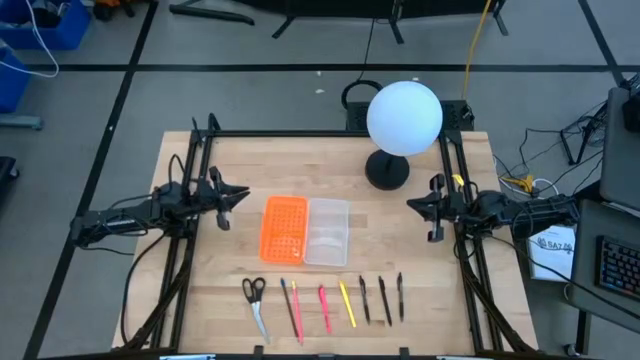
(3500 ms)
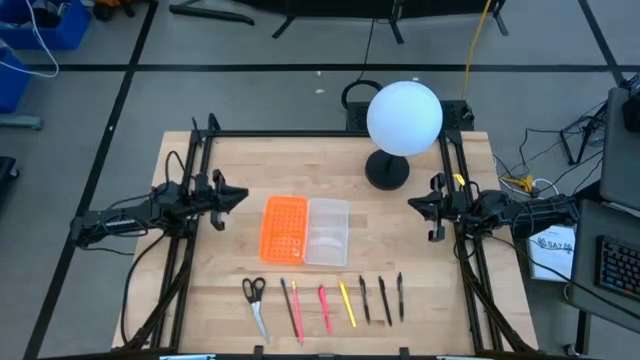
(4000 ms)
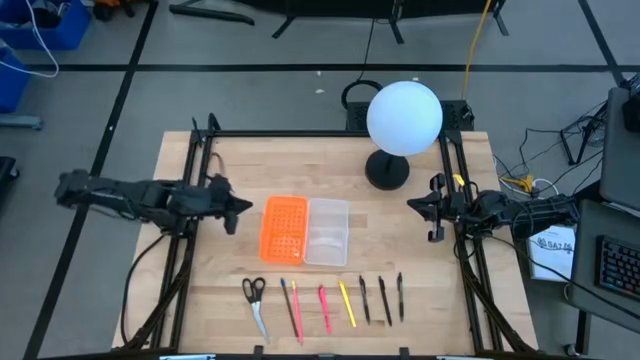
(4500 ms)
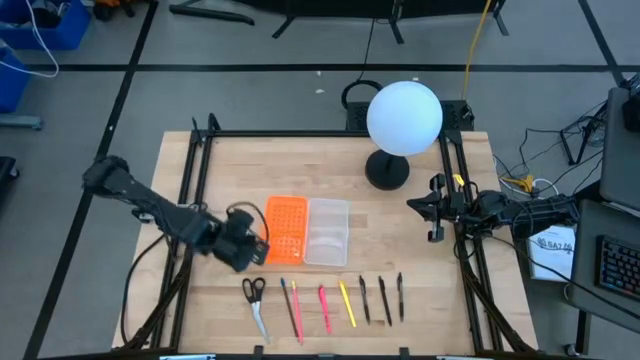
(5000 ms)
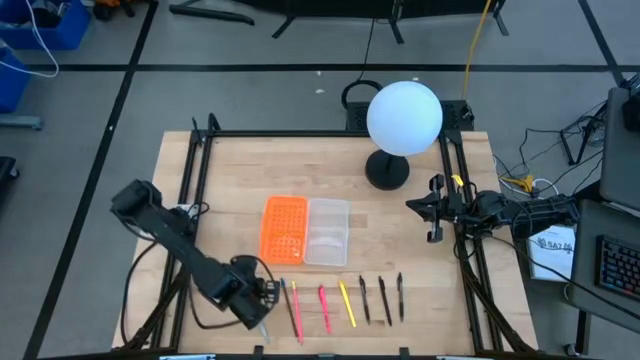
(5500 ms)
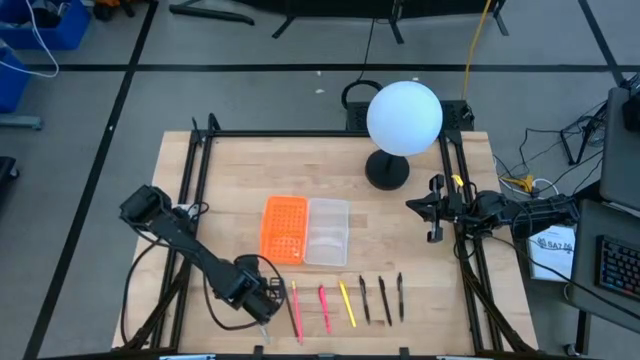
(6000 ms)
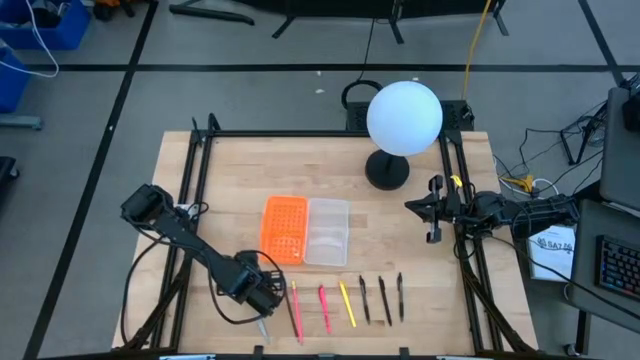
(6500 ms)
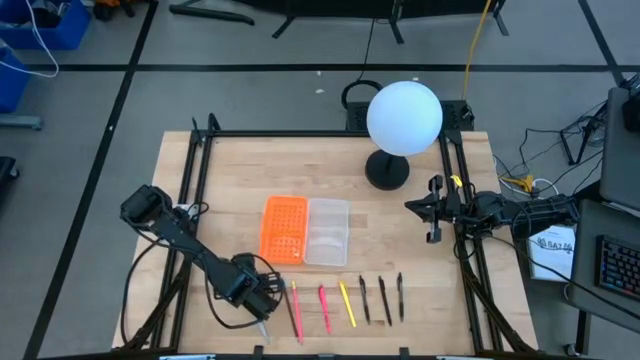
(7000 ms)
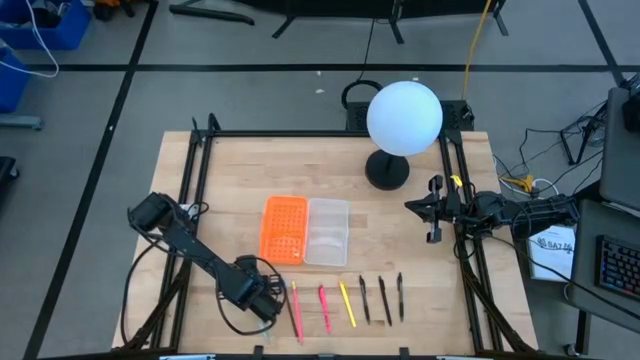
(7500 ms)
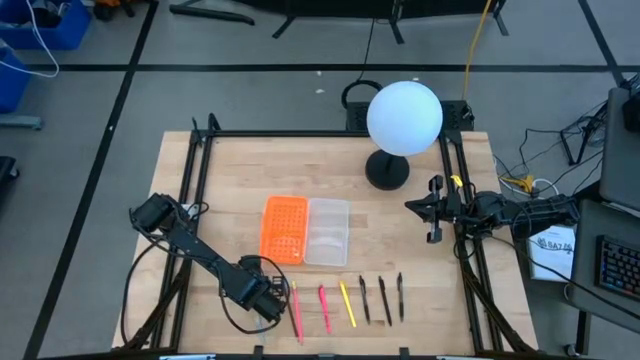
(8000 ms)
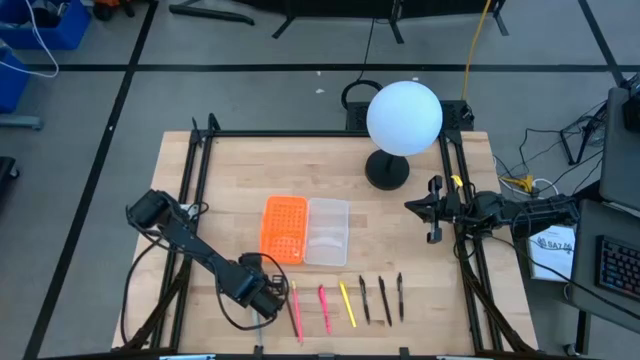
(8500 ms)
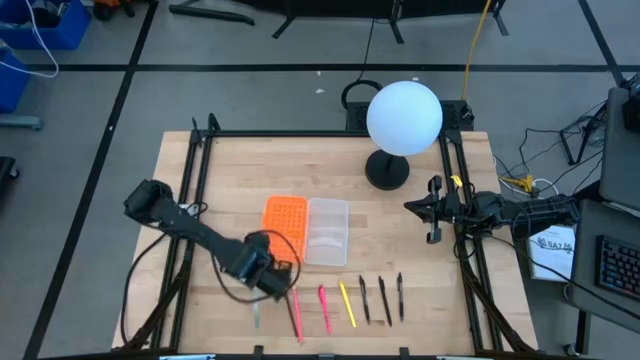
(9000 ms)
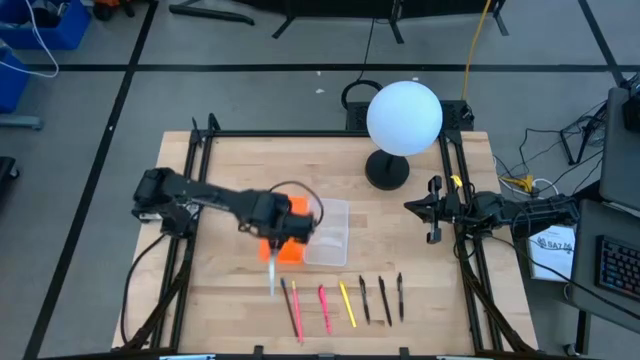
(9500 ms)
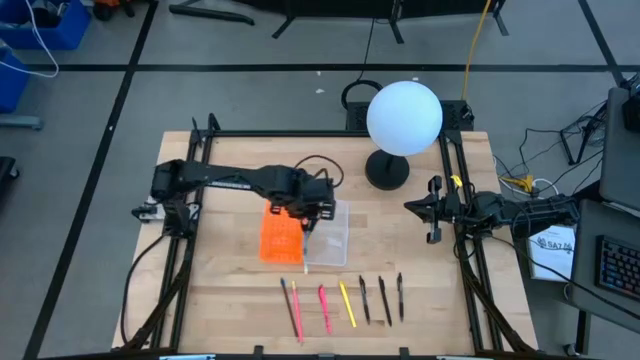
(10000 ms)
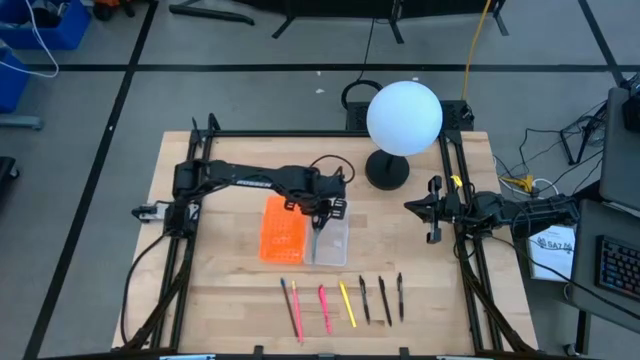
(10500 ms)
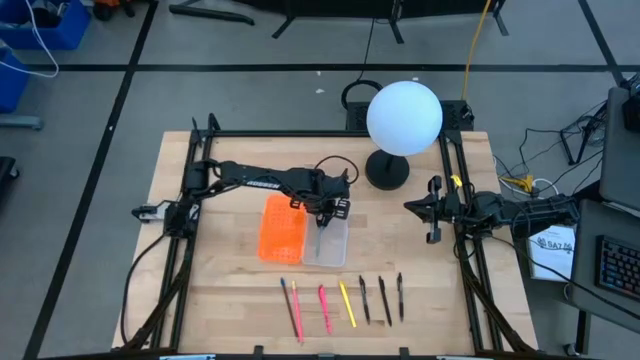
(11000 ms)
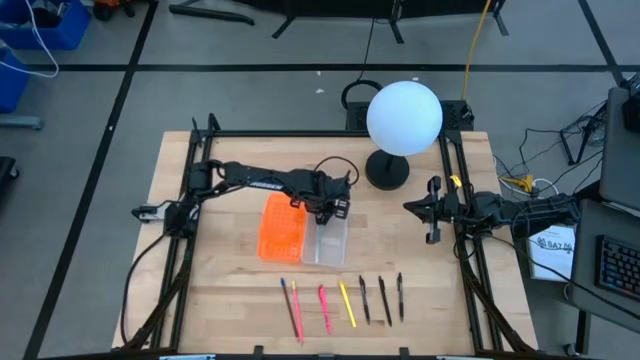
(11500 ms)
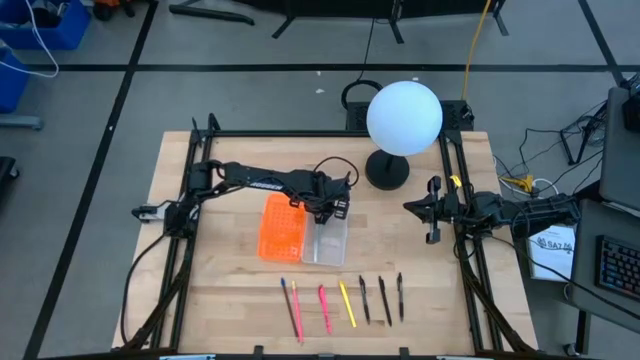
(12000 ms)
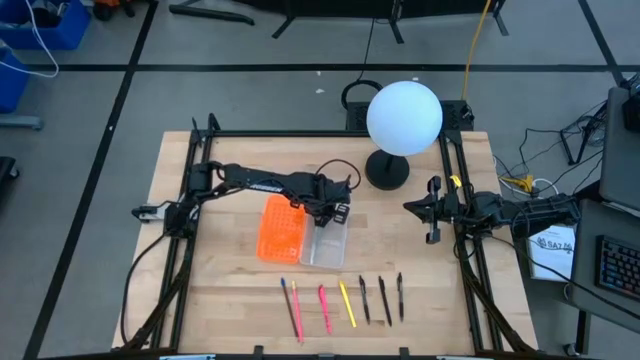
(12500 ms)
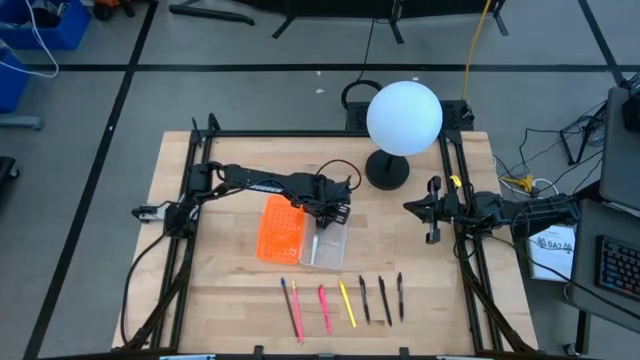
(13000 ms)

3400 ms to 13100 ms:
Task: Pick & place school supplies into a supply box
Put the black scissors into the orange supply box

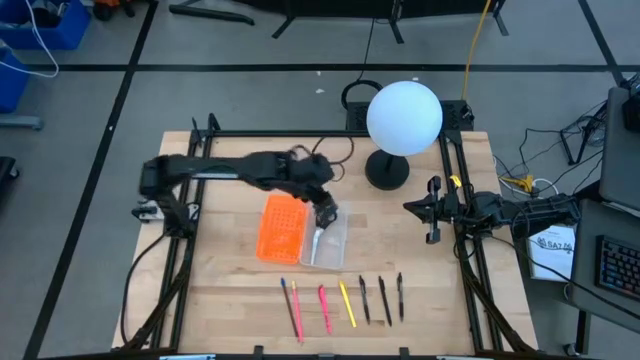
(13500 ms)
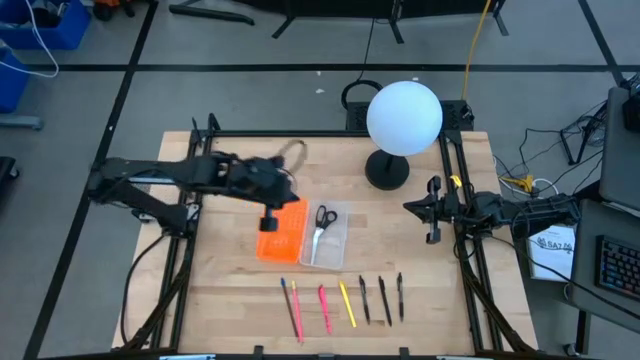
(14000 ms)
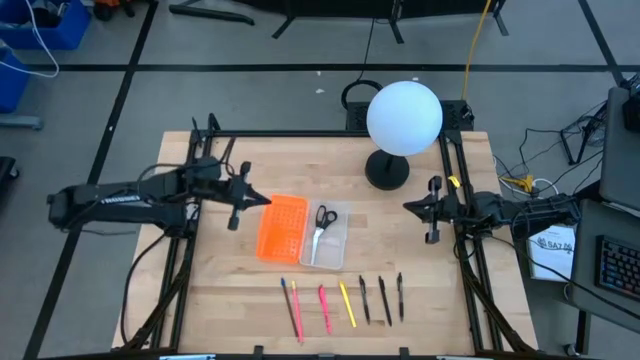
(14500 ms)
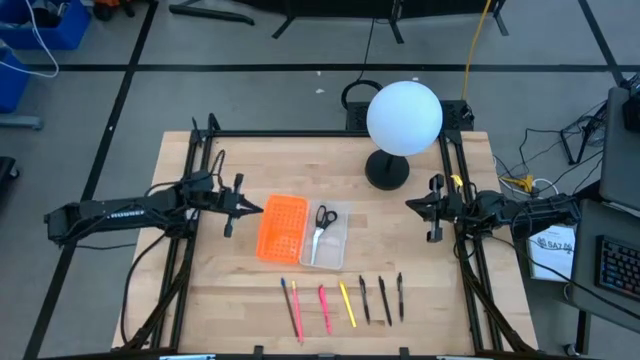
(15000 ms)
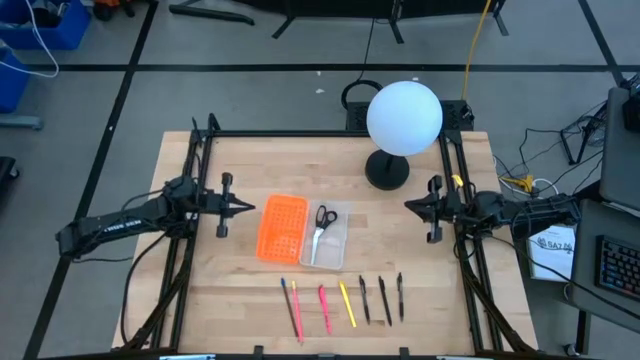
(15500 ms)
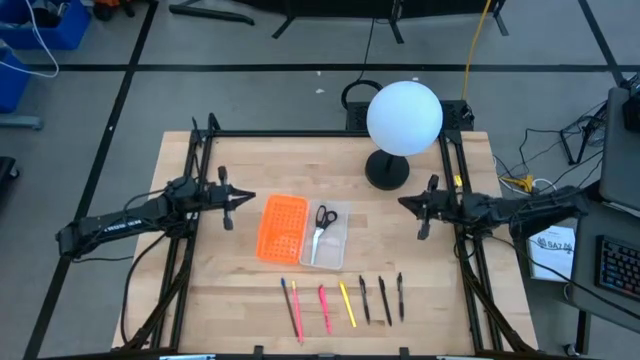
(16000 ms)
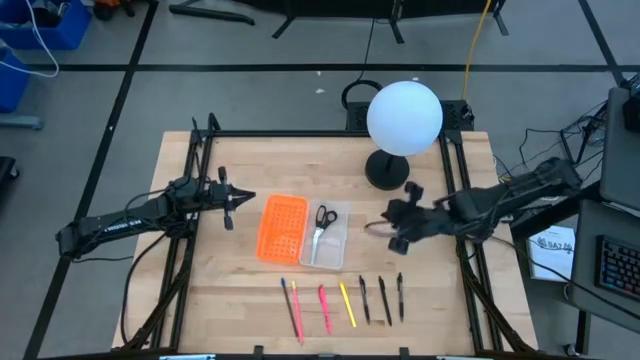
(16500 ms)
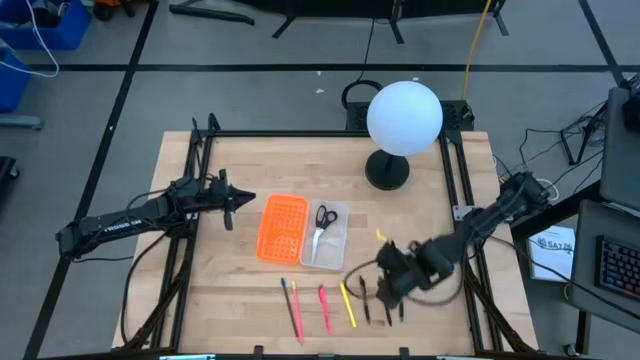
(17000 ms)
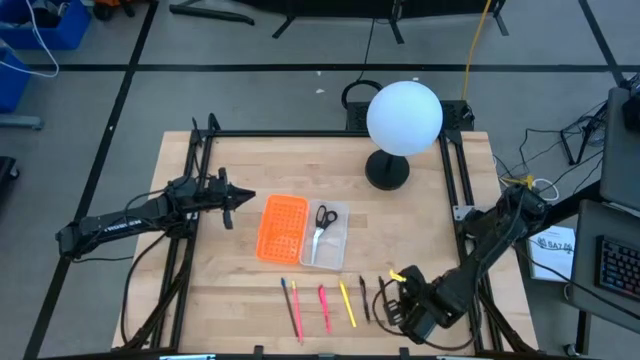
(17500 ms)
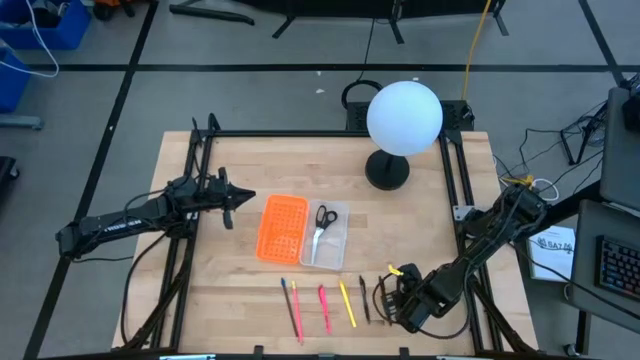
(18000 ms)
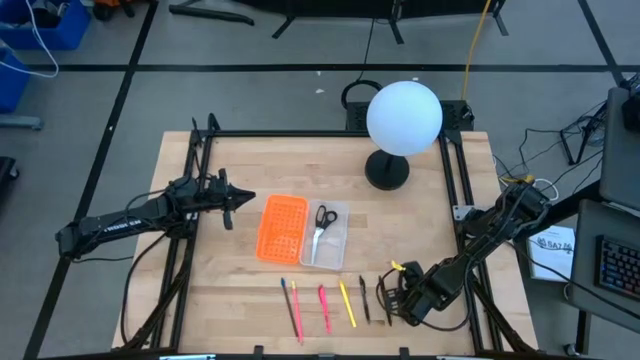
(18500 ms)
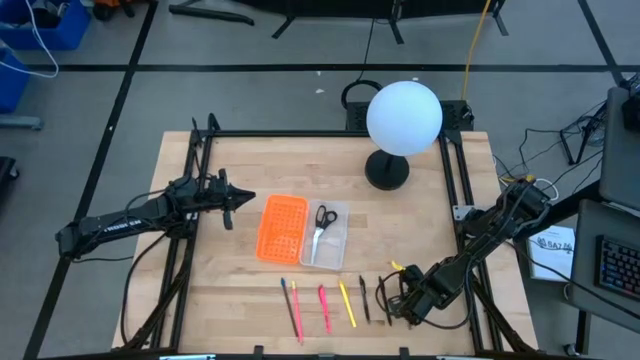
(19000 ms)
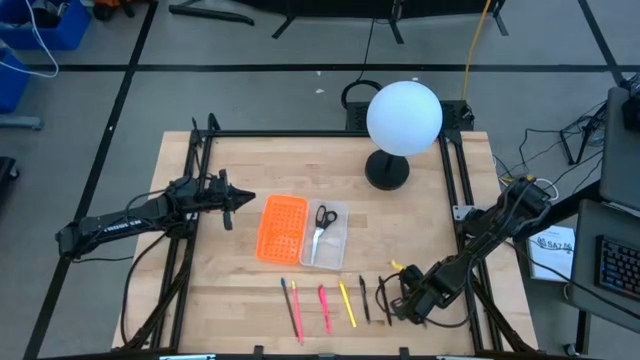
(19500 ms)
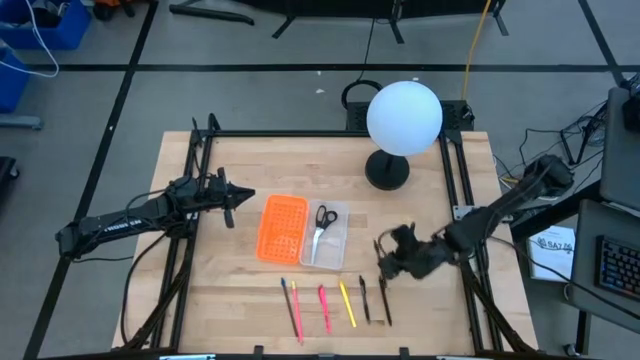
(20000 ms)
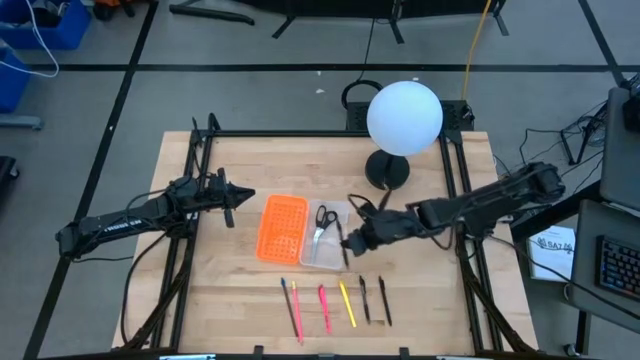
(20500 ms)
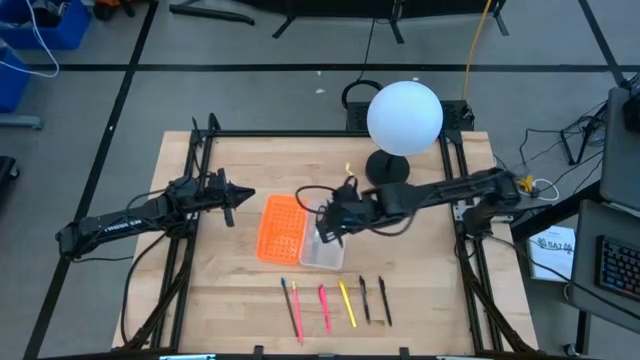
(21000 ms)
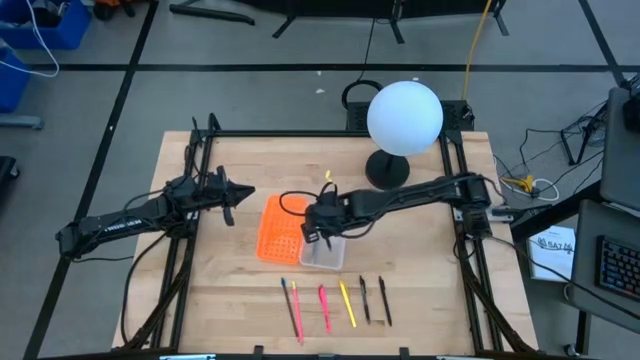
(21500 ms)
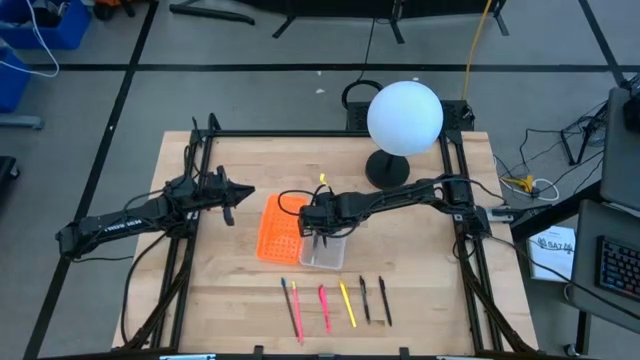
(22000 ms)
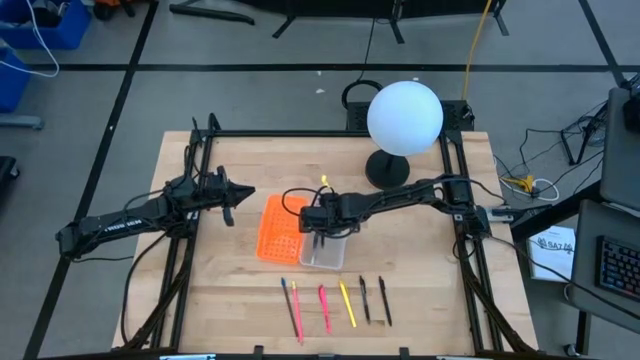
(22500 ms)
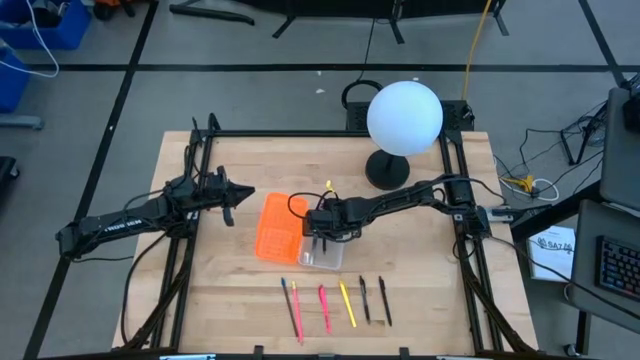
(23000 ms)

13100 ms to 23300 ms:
Put the black pen into the orange supply box

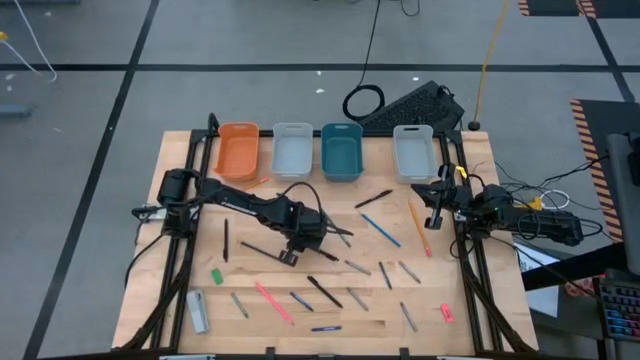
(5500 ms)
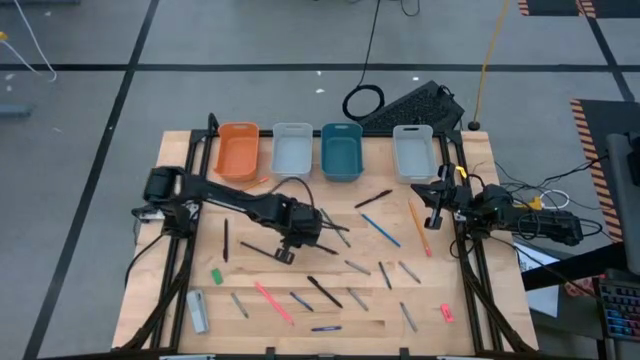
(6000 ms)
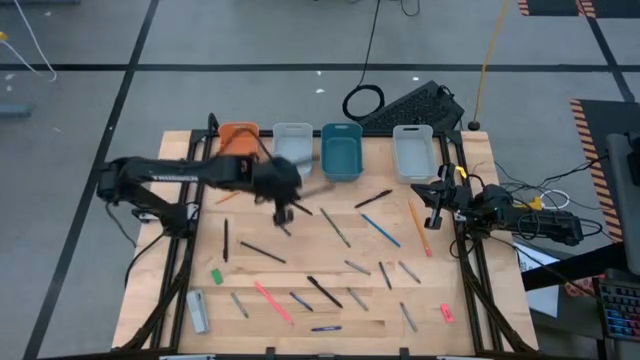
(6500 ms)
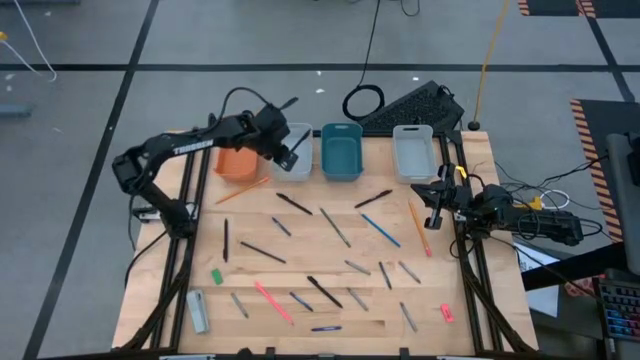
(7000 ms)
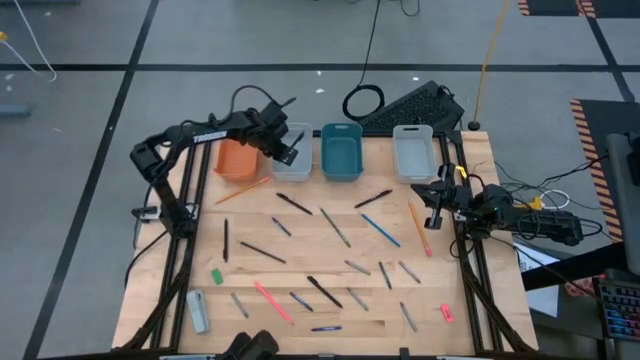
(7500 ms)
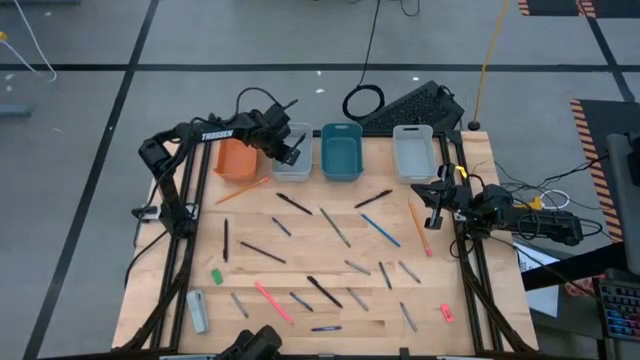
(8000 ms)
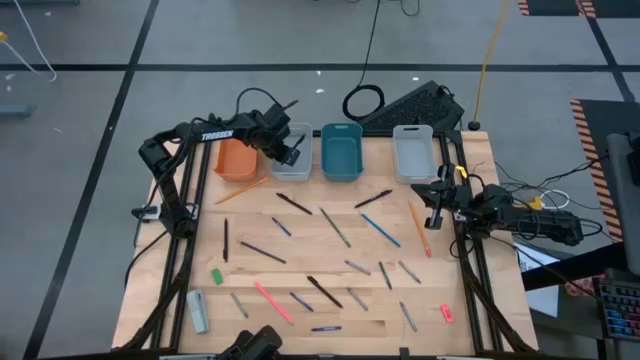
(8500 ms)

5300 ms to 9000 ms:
Task: Sort crayons/erasers/pens/pencils in bins
Put the black pen into the left gray bin
